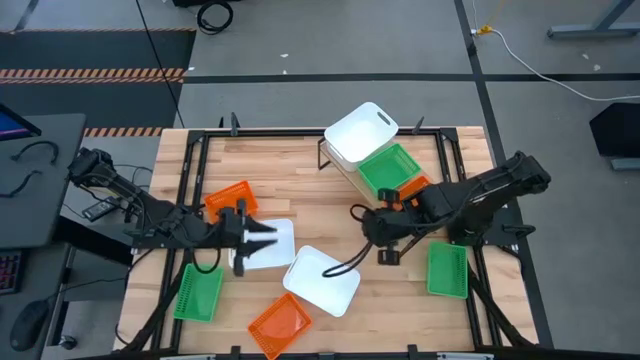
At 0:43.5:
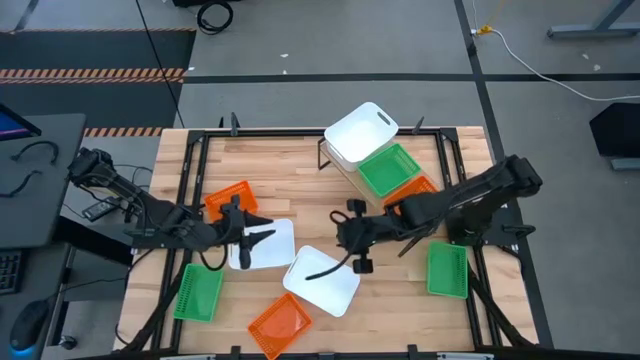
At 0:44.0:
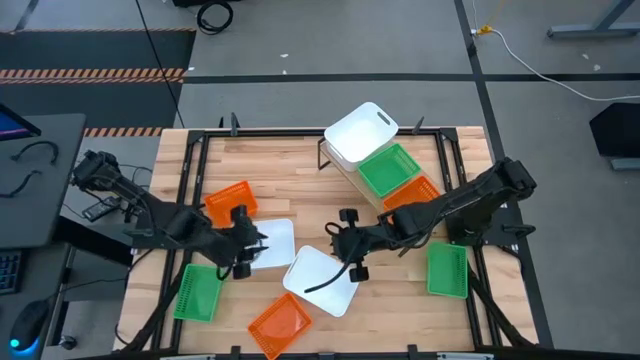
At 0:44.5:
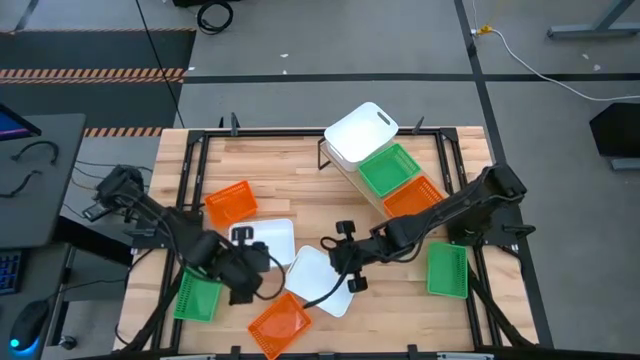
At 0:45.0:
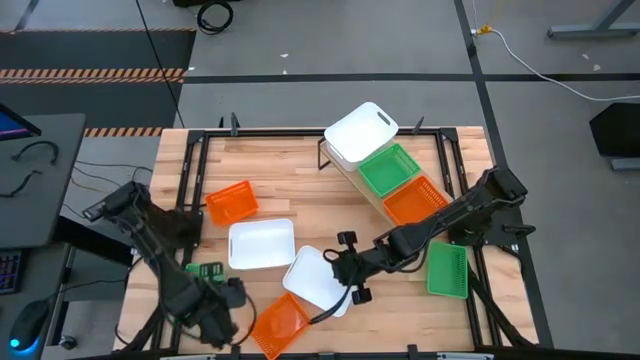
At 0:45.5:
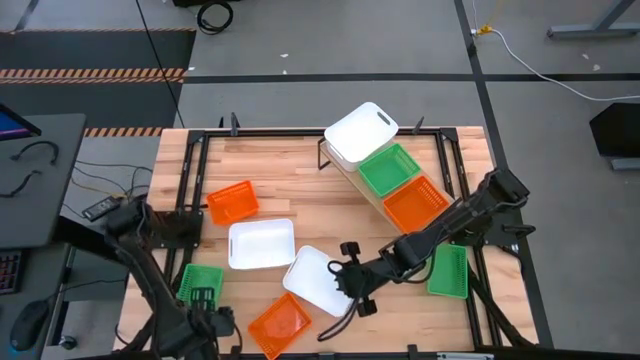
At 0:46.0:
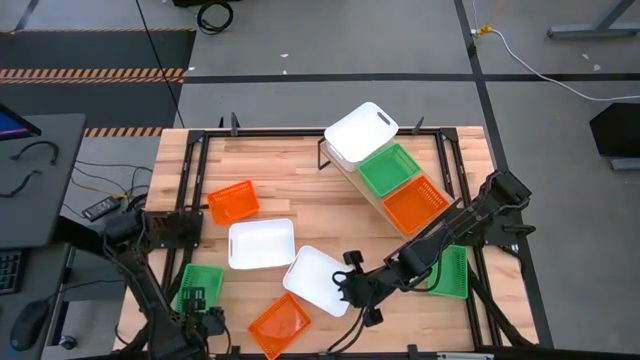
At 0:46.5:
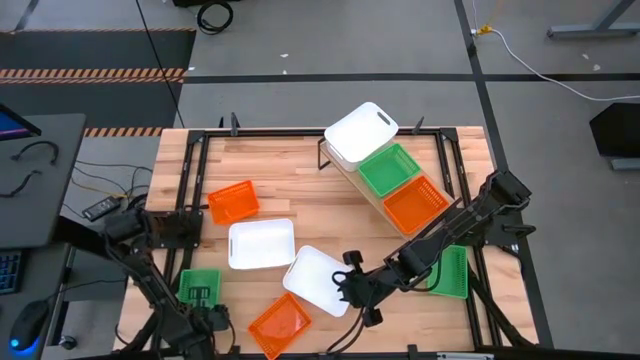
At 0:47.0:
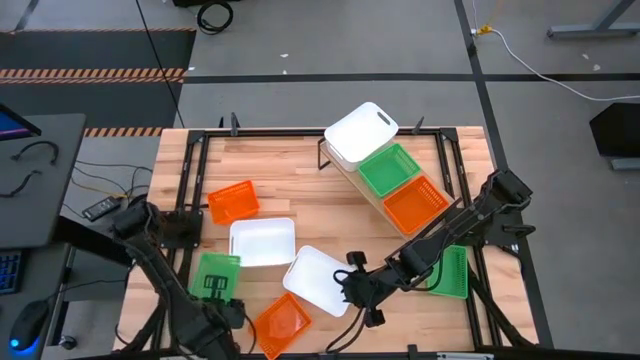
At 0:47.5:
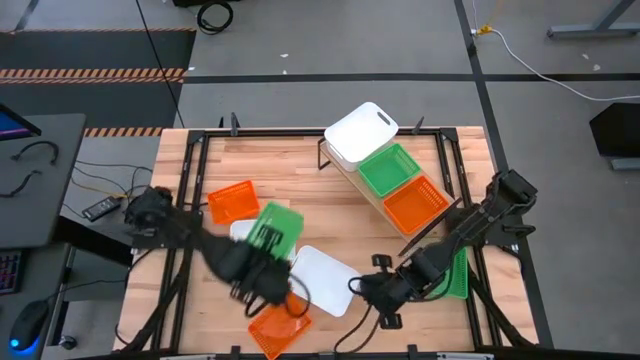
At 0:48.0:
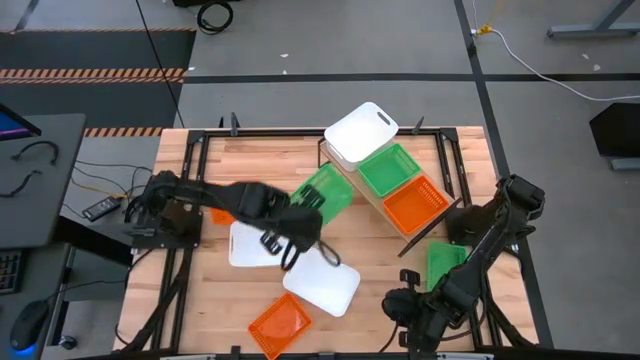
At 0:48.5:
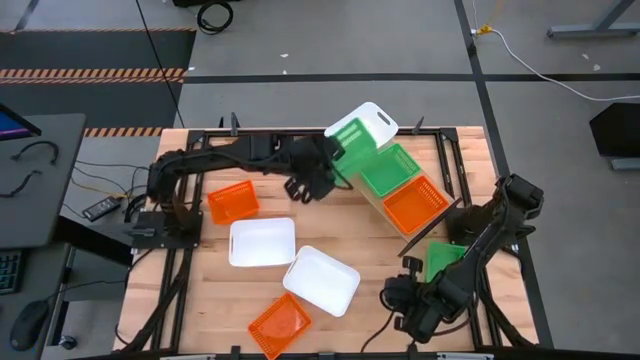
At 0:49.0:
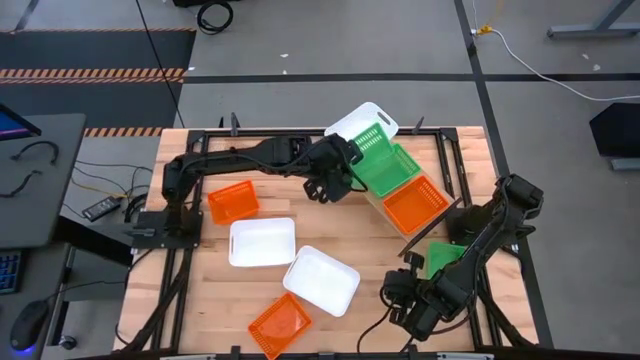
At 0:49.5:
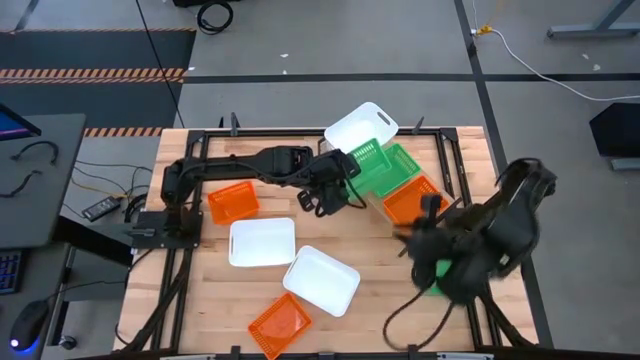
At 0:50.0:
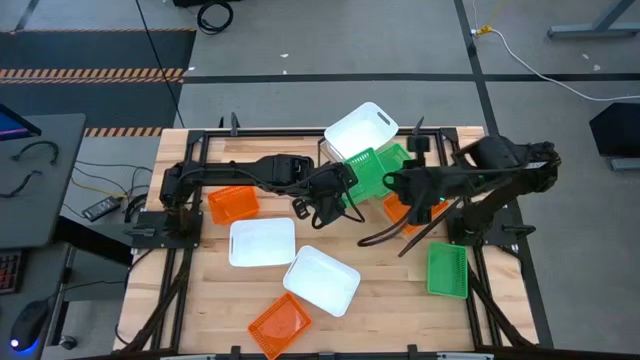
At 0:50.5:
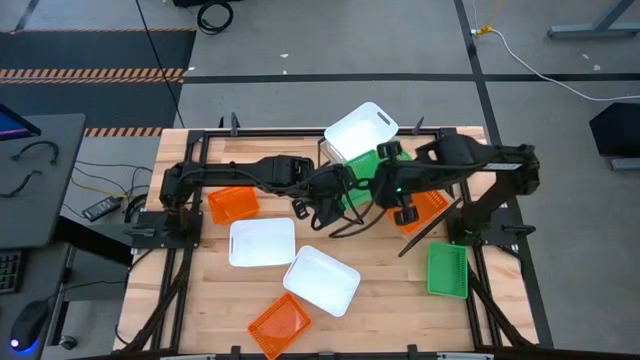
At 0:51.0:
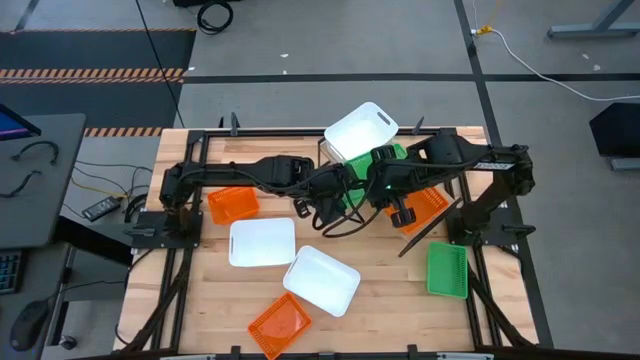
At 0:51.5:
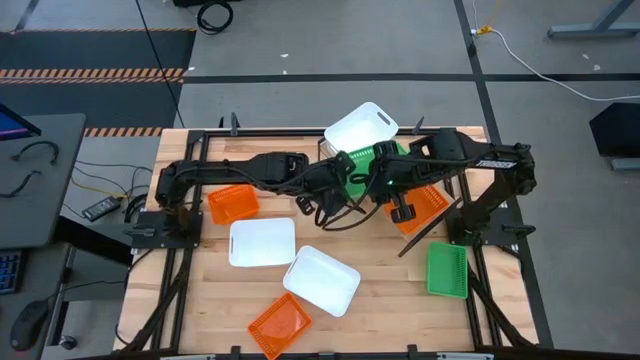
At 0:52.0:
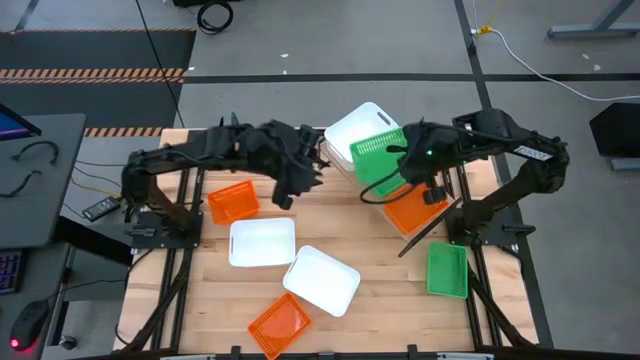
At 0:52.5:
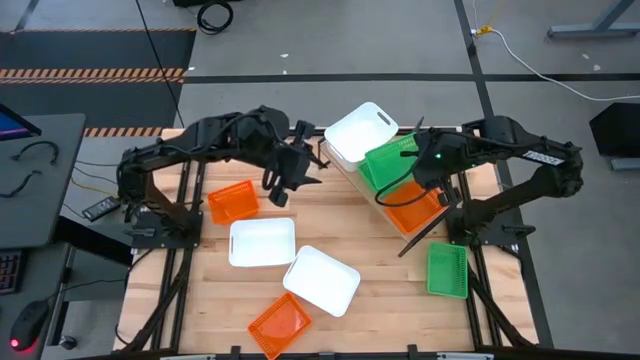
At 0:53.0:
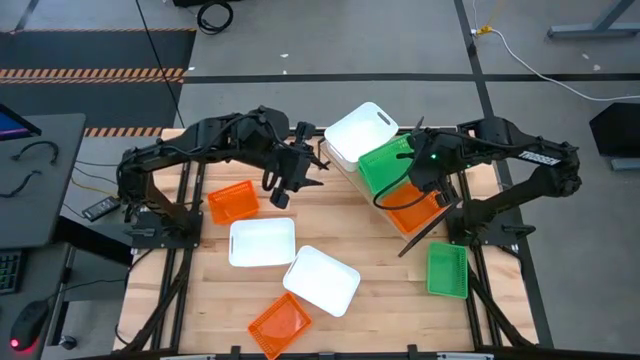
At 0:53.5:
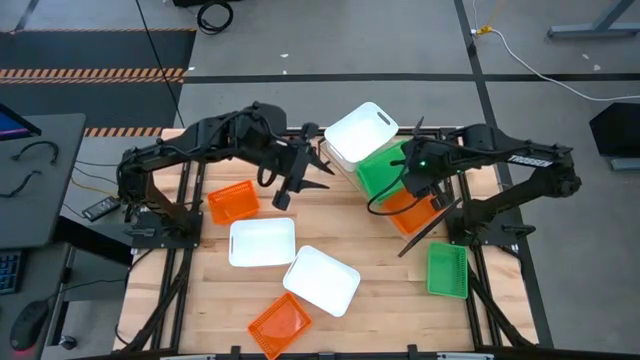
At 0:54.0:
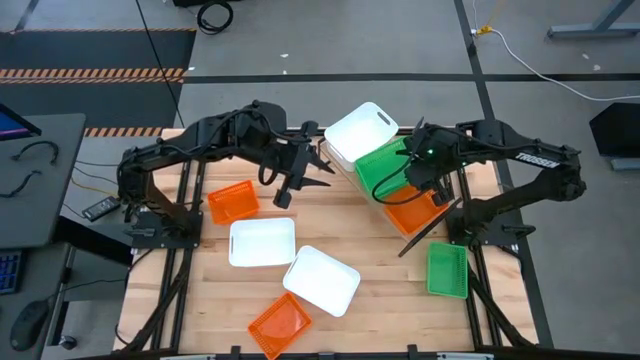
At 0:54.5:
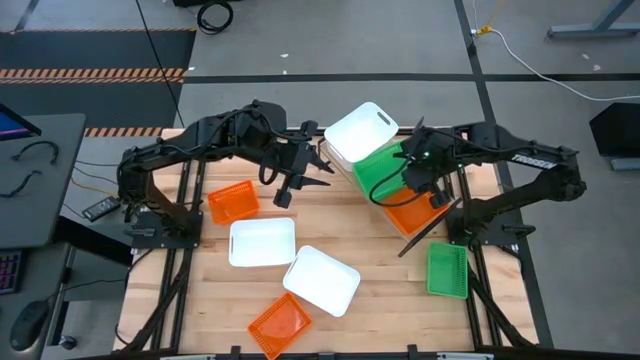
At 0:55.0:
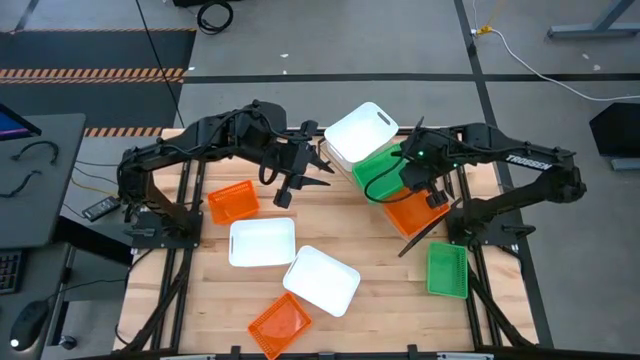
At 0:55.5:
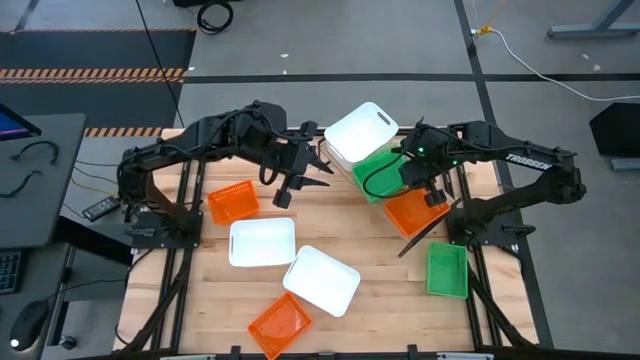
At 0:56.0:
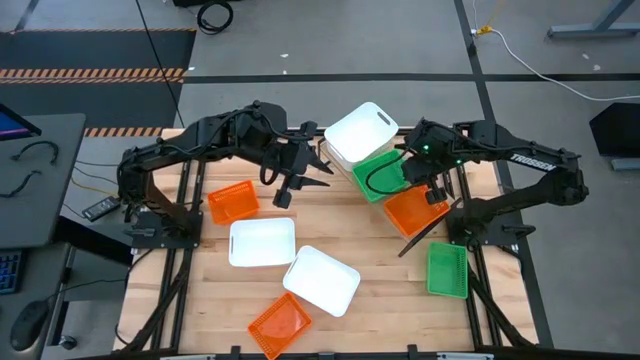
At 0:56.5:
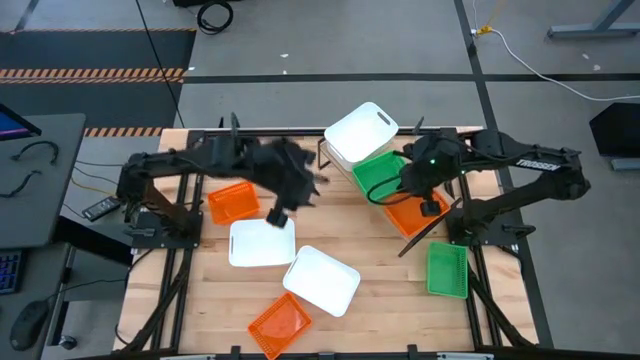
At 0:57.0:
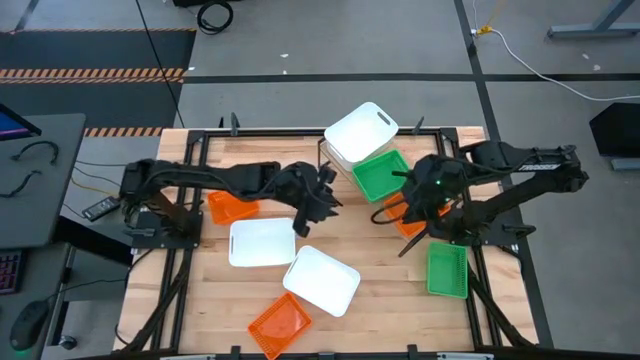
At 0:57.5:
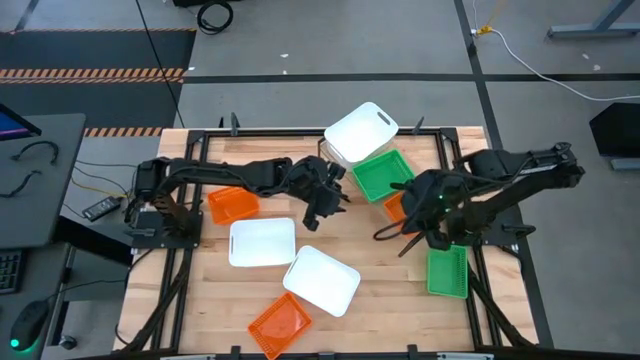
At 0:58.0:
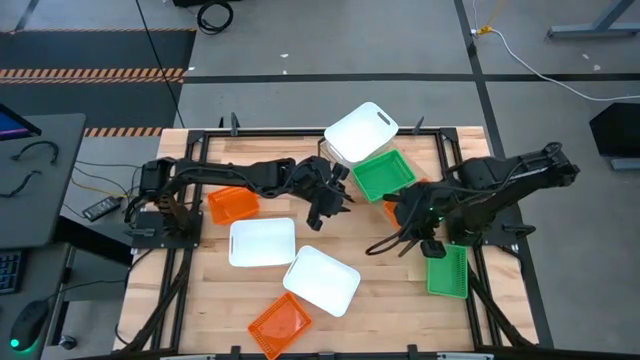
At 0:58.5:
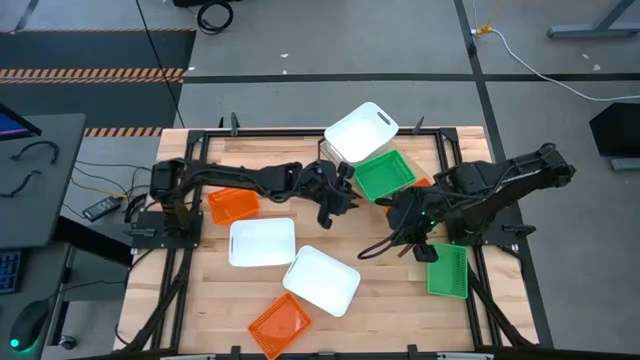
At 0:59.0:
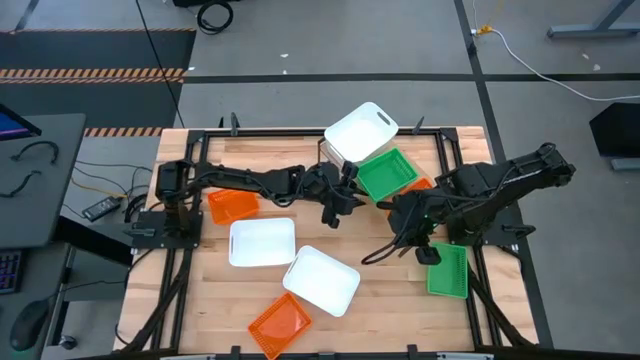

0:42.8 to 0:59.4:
Task: Stack baskets on shelf by color
Stack the left green bin on top of the green bin on the shelf

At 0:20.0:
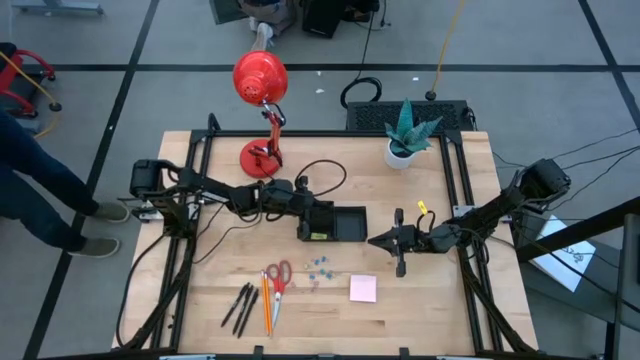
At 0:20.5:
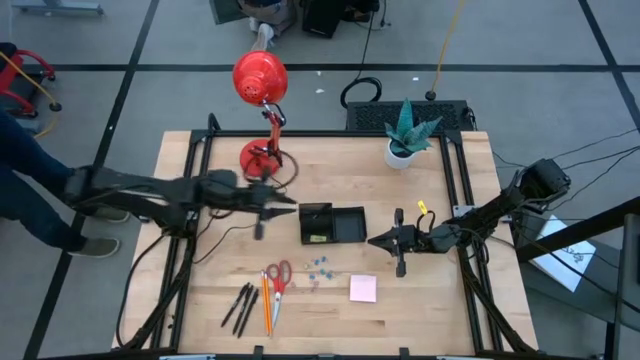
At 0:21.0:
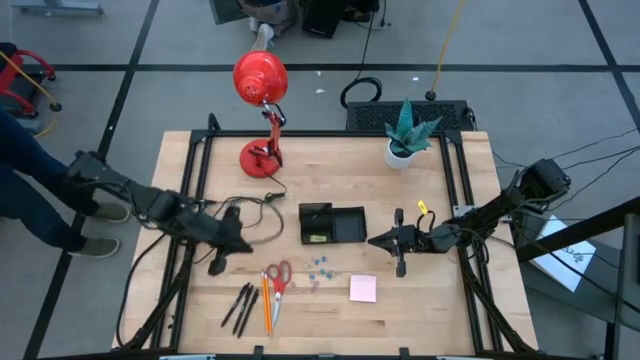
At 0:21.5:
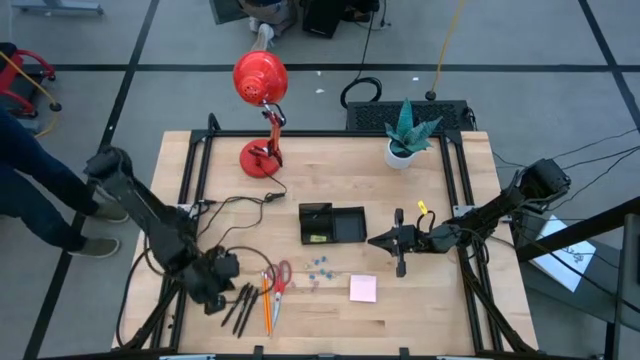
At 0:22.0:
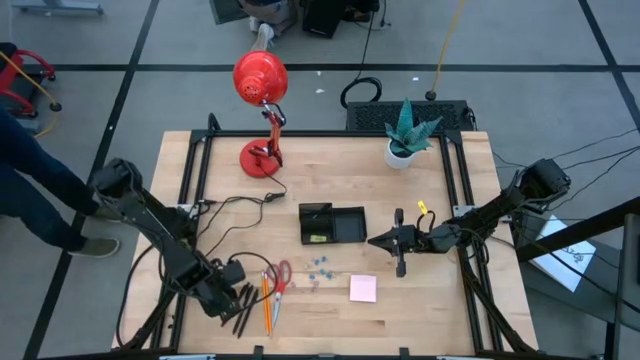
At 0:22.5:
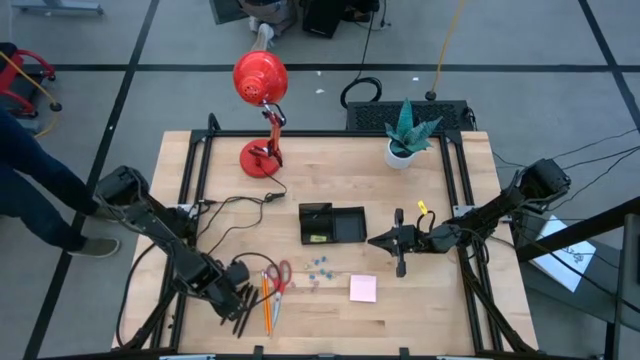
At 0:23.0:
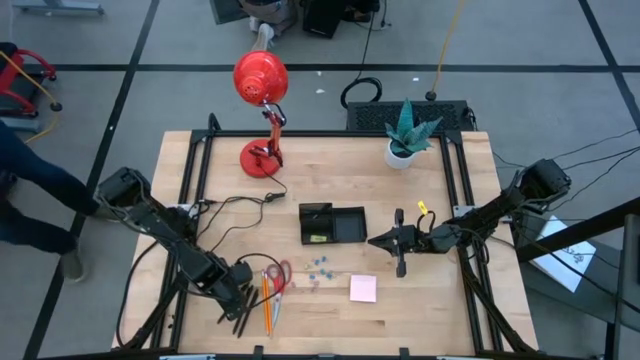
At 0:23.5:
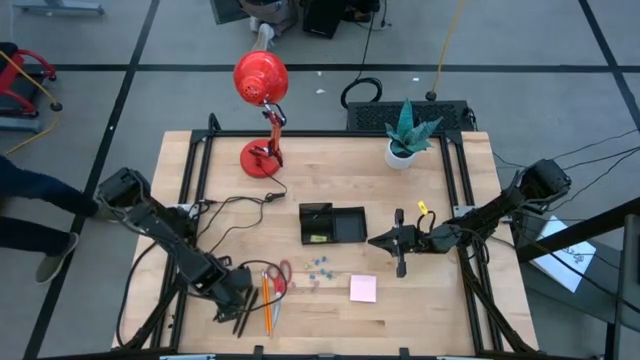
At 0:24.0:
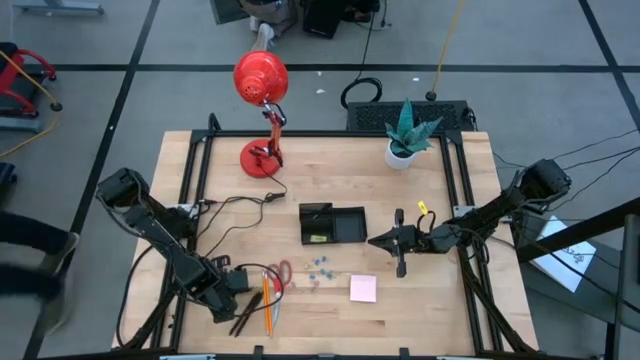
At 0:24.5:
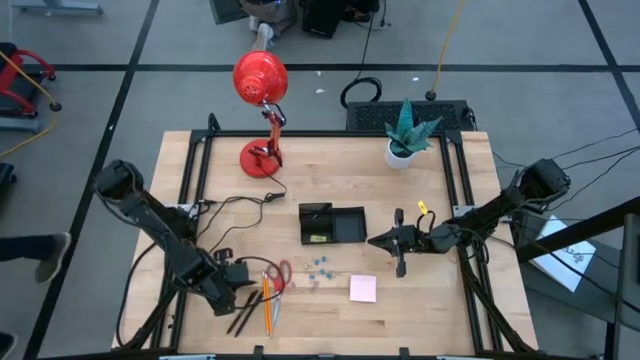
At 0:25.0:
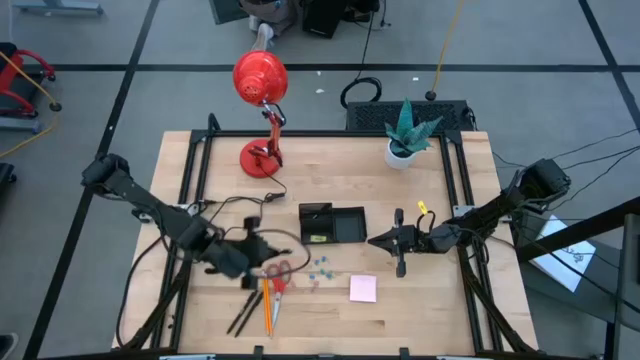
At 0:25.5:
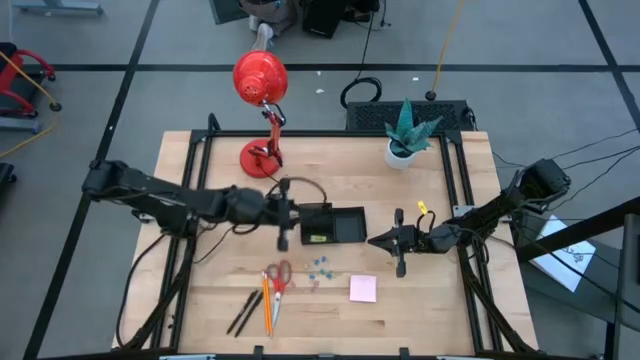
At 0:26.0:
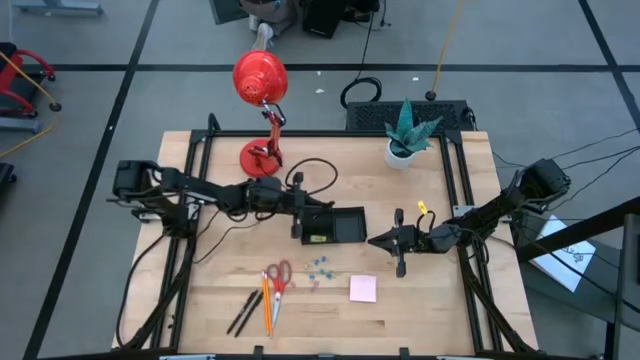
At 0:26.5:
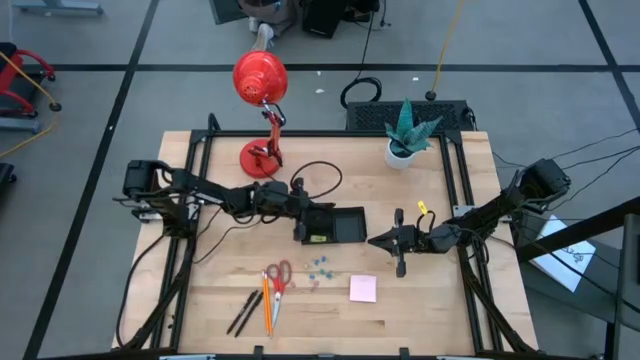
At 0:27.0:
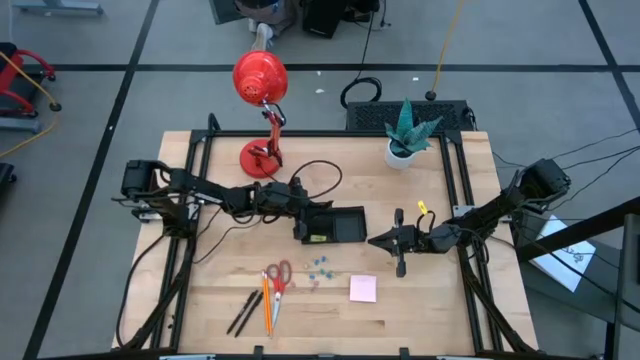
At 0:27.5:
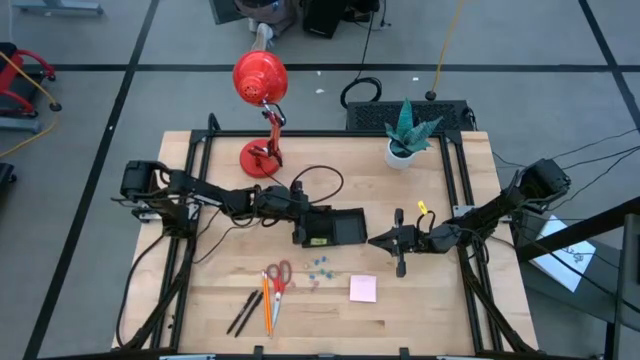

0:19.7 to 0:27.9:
Task: Pick and place office supplies into organizer
Put the black pen into the desk organizer
